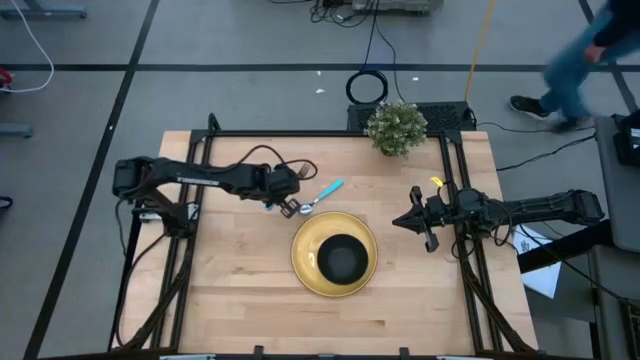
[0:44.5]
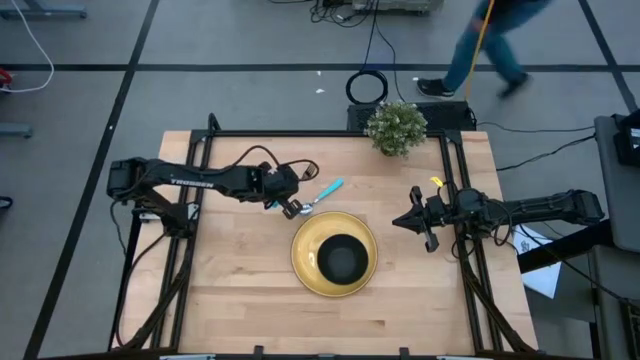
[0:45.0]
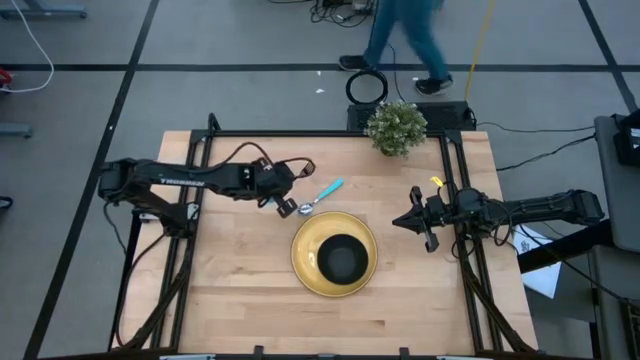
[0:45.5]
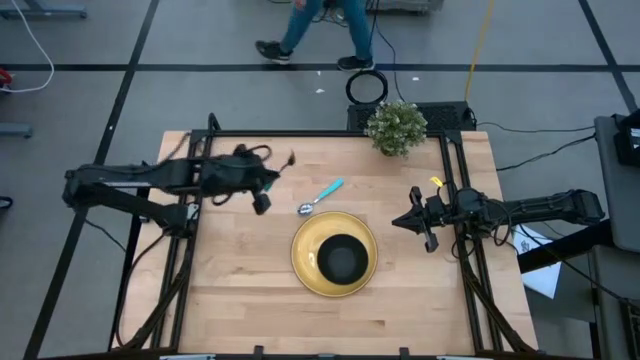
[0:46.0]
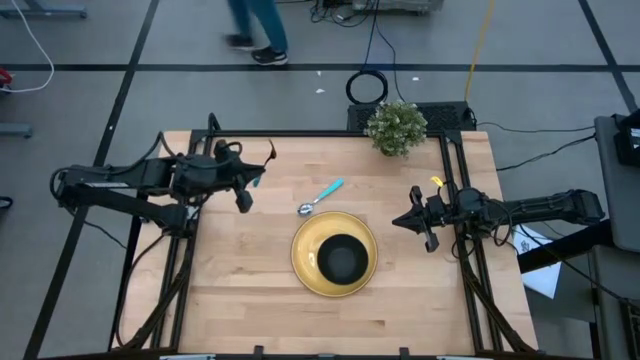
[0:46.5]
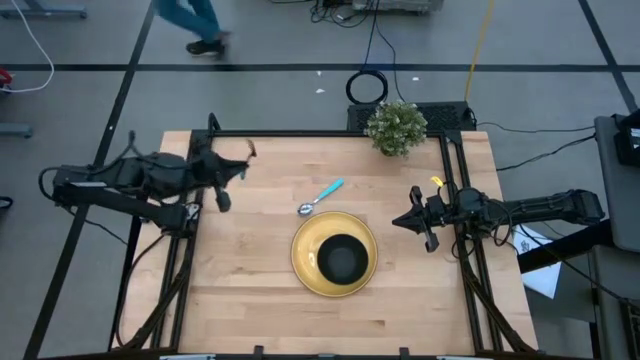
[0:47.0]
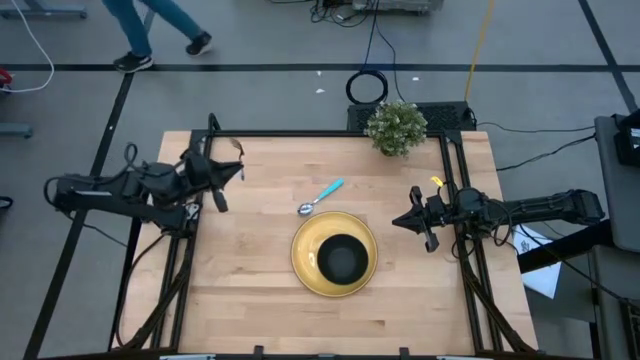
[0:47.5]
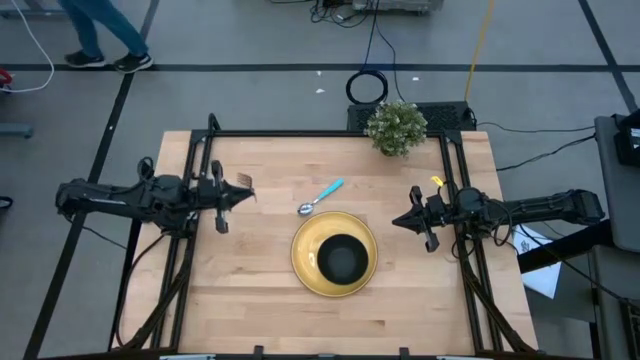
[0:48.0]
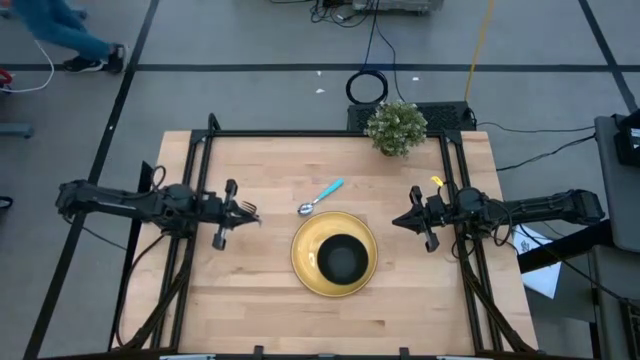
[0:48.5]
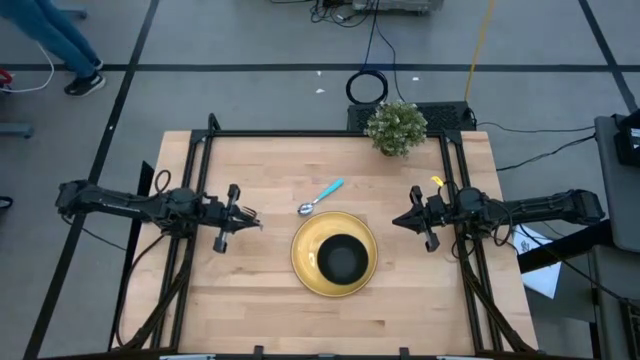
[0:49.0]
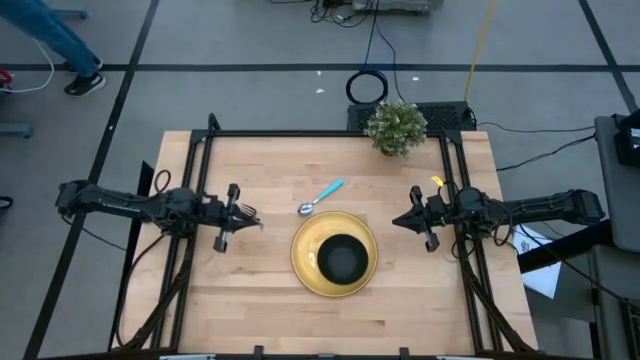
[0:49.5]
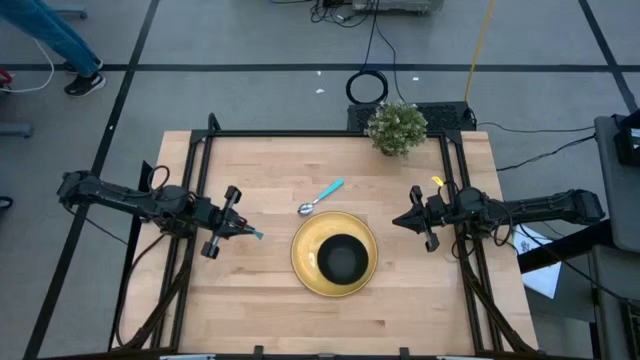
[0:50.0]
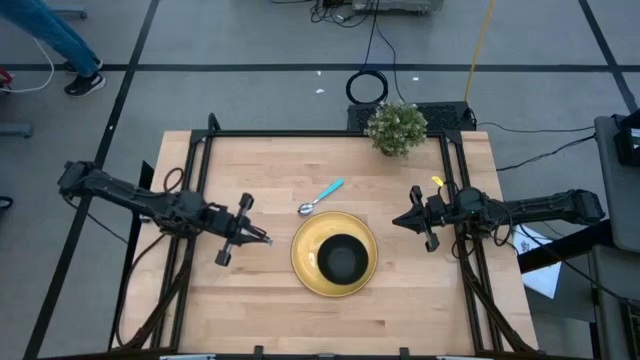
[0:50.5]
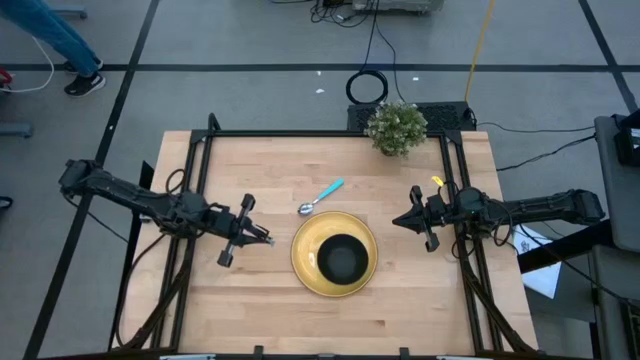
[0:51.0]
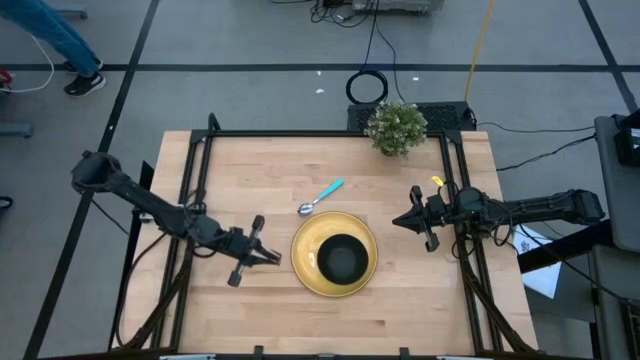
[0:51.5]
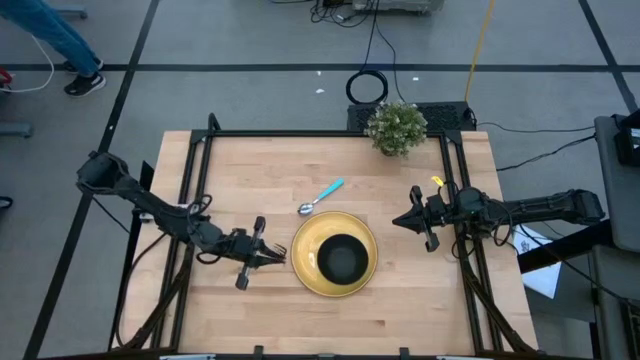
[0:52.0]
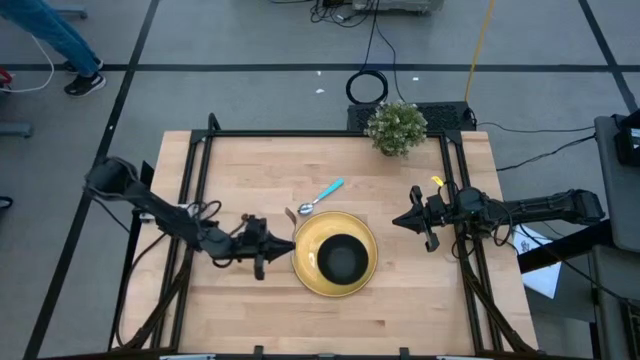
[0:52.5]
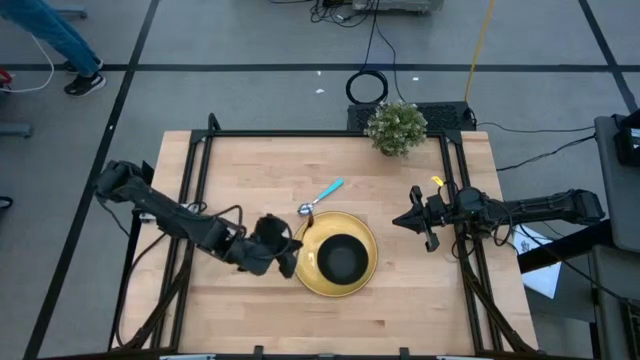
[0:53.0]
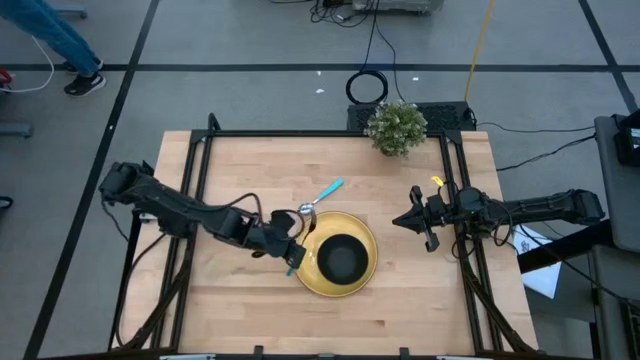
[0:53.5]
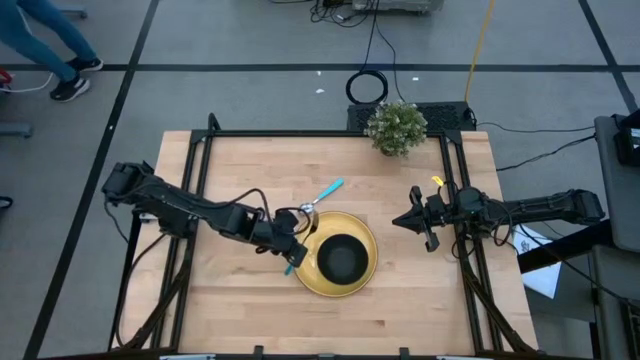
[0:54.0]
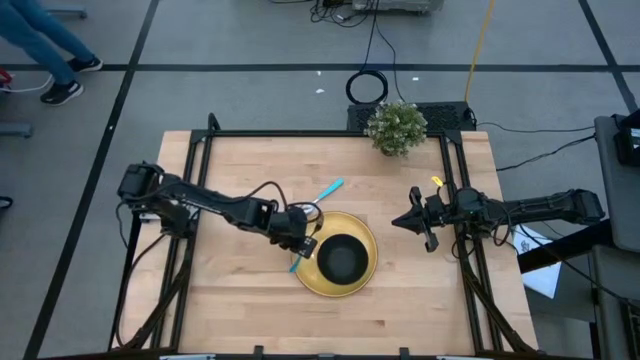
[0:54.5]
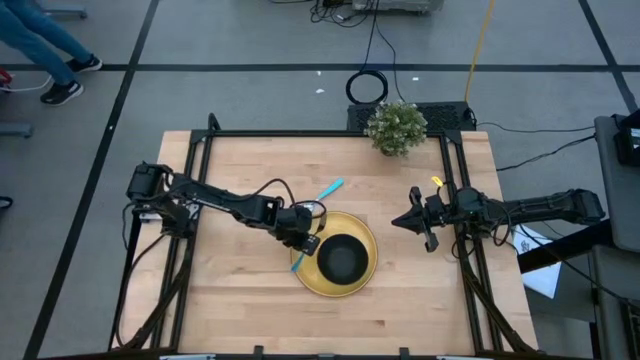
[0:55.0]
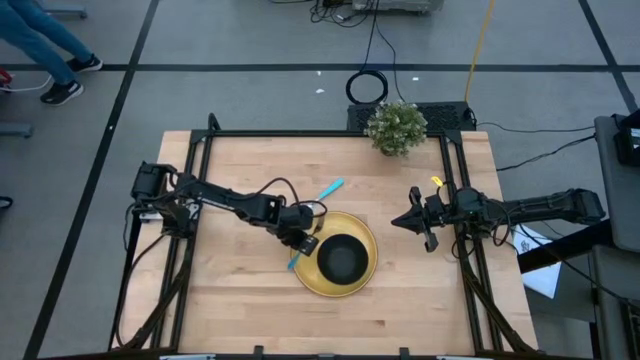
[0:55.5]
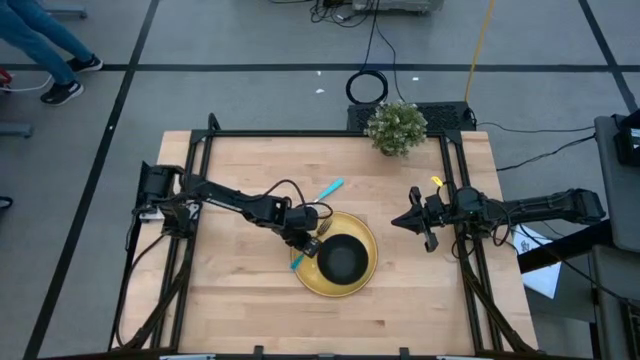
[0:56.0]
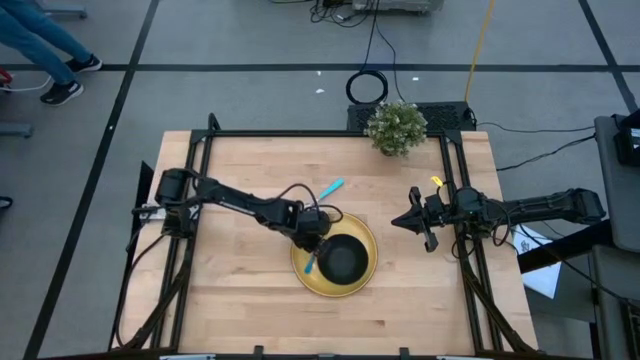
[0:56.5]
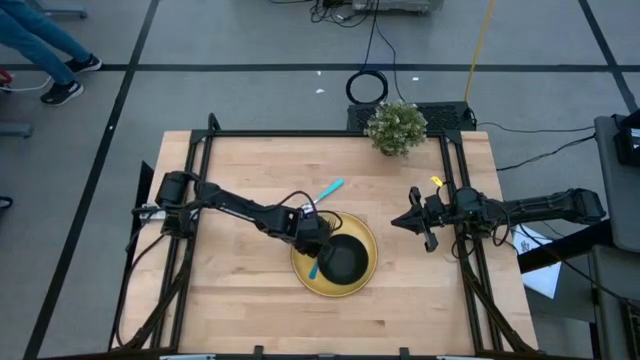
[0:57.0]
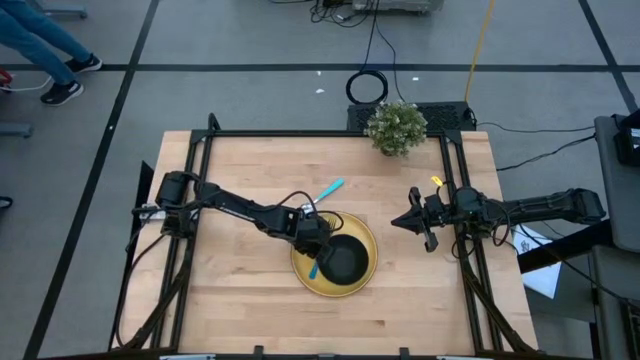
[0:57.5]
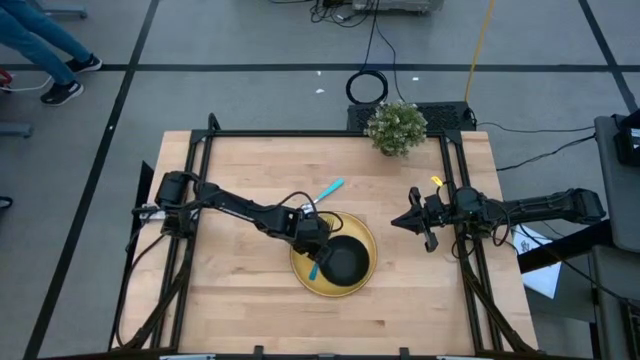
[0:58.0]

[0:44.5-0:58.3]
Task: Set table place
Put the blue fork on top of the yellow plate

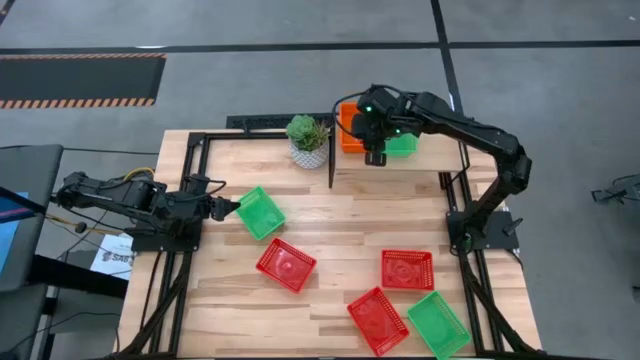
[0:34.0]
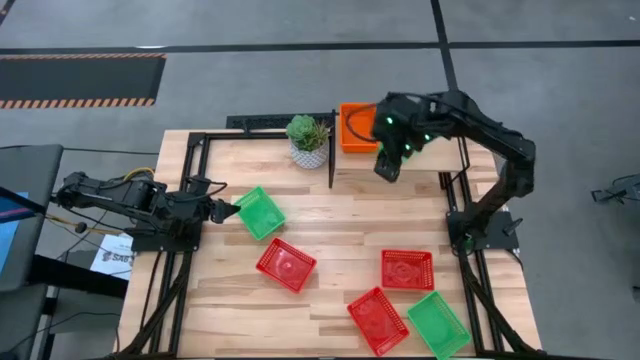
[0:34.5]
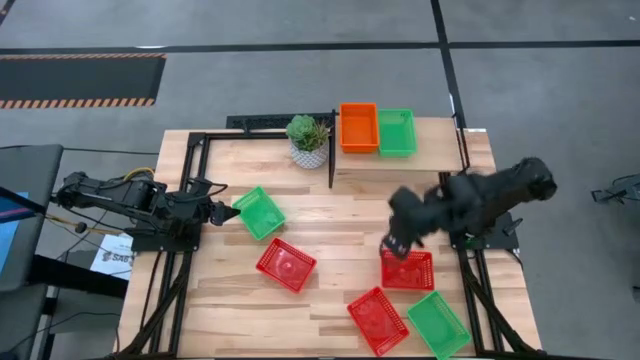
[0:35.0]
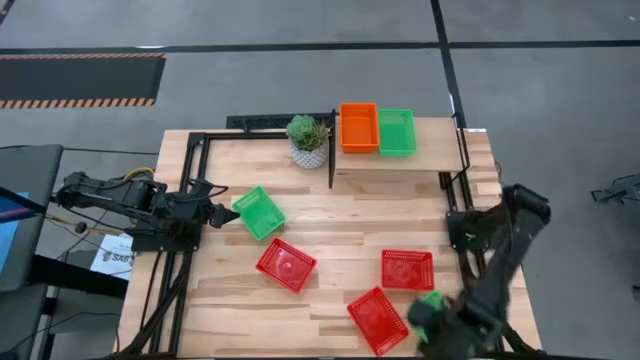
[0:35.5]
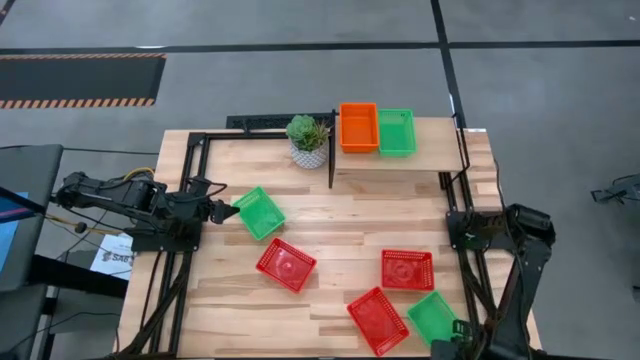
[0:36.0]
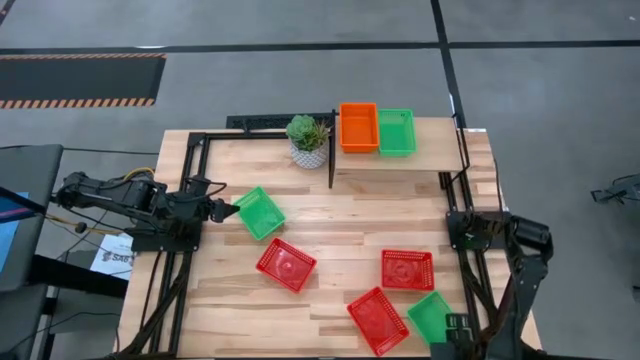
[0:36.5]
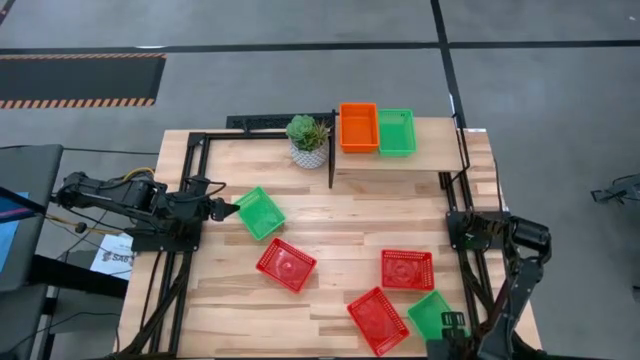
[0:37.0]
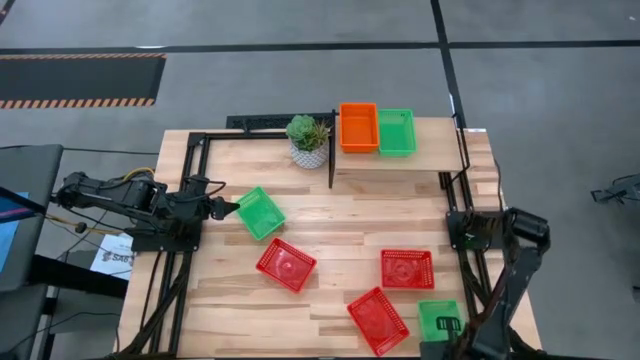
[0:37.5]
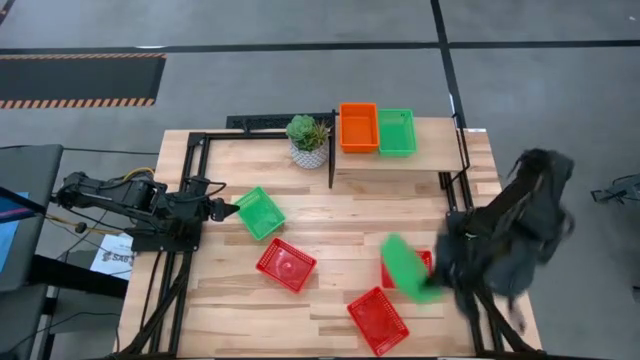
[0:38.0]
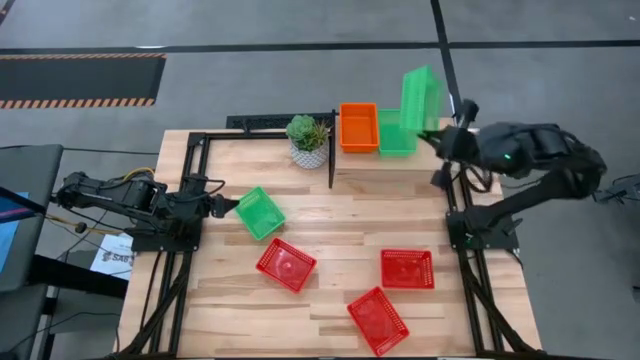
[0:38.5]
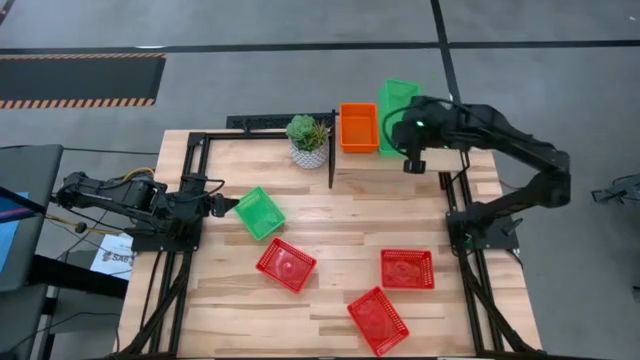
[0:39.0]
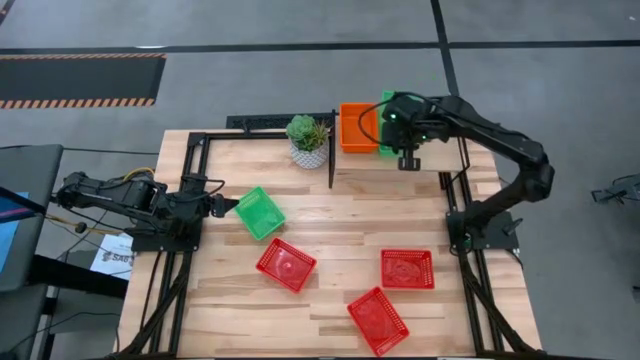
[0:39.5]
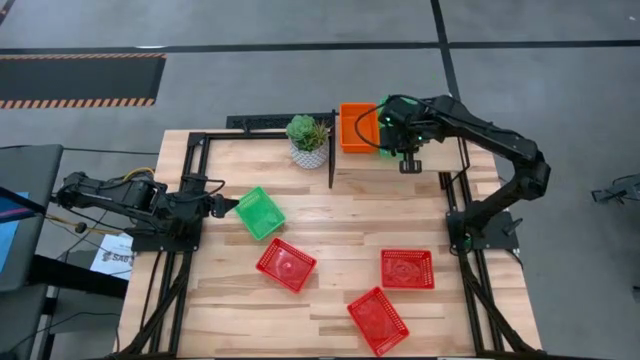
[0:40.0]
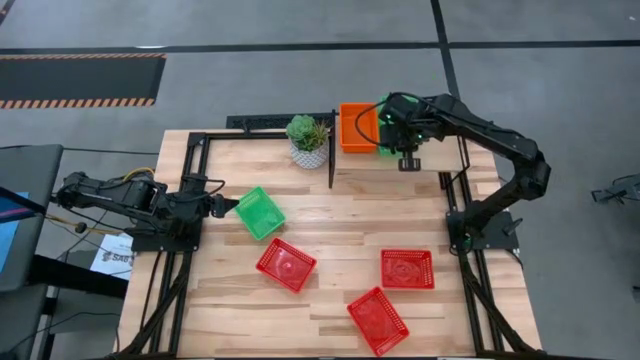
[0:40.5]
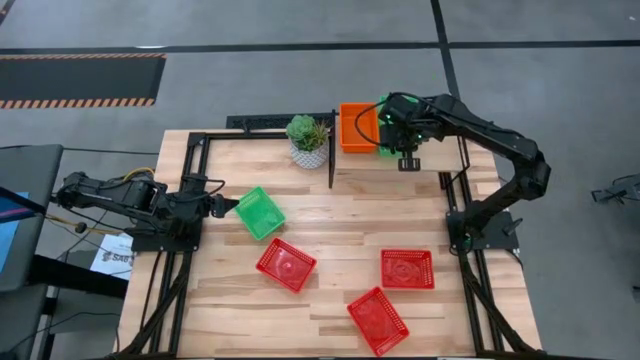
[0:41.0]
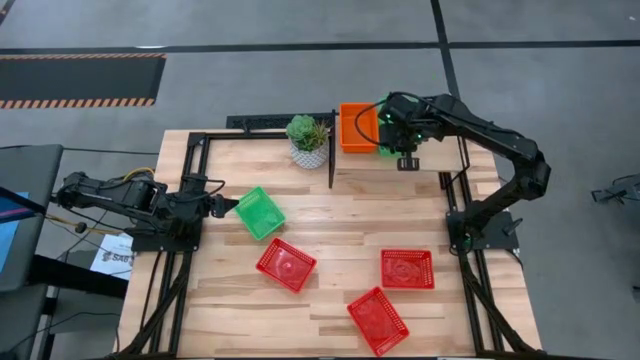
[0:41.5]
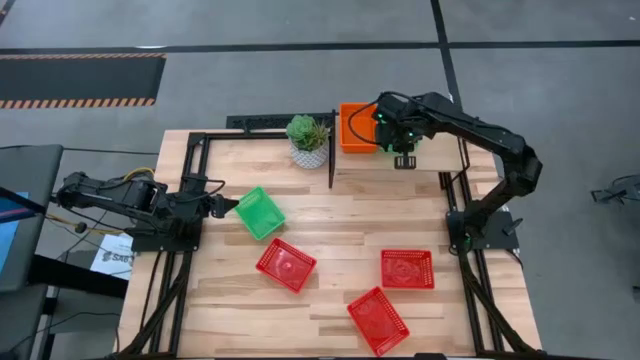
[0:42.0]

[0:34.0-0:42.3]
Task: Stack baskets on shelf by color
Stack the bottom green bin on the green bin on the shelf
